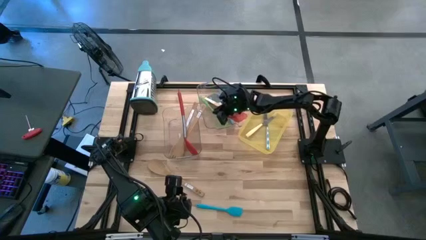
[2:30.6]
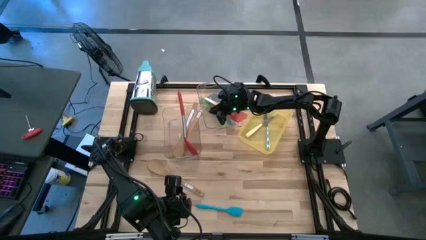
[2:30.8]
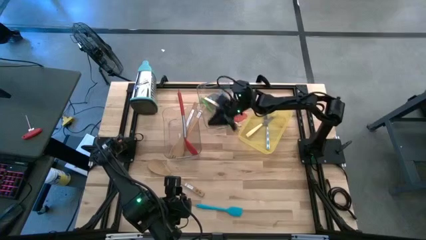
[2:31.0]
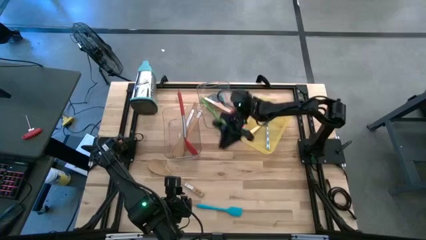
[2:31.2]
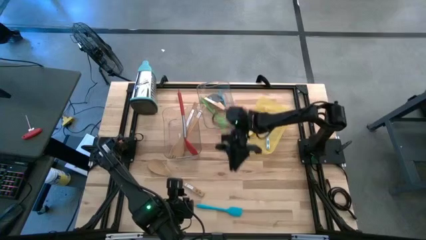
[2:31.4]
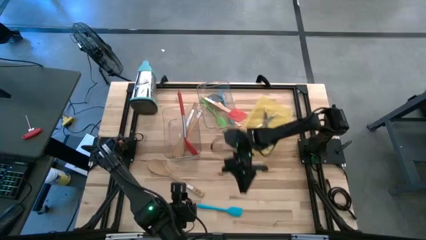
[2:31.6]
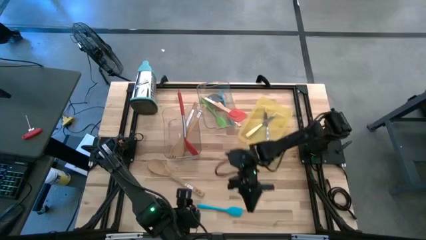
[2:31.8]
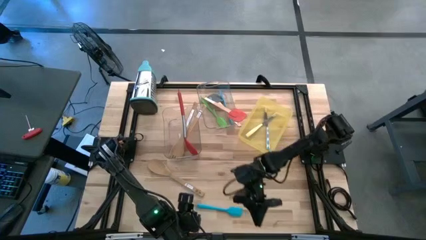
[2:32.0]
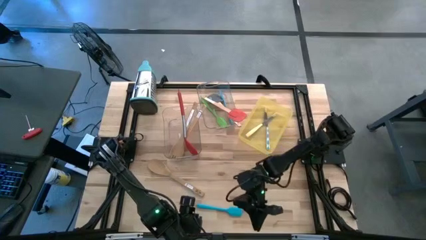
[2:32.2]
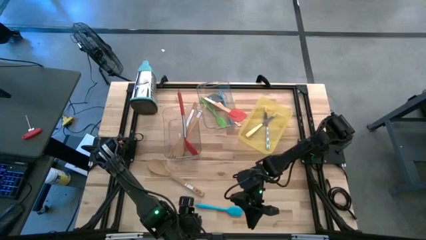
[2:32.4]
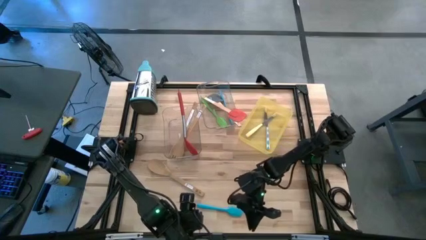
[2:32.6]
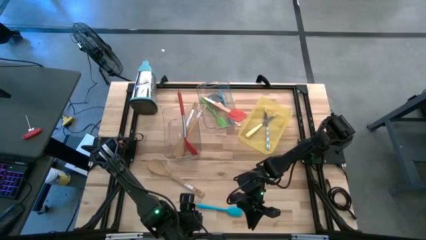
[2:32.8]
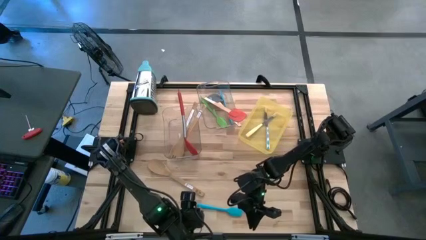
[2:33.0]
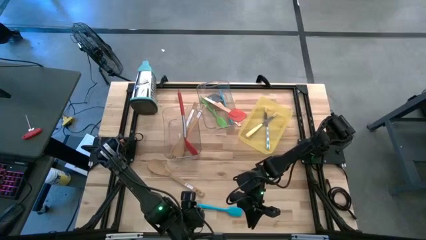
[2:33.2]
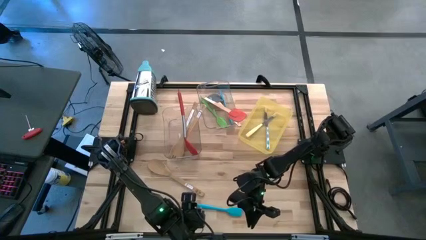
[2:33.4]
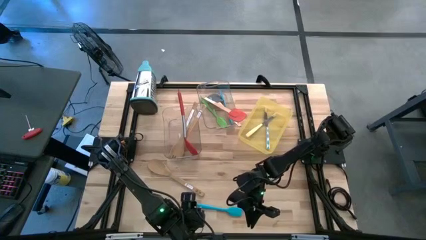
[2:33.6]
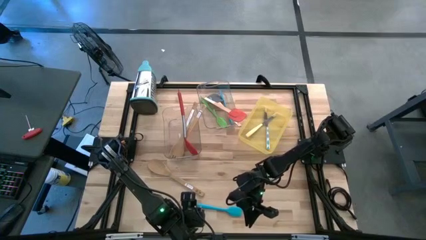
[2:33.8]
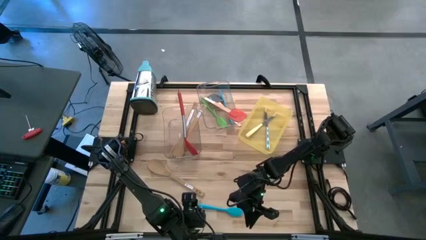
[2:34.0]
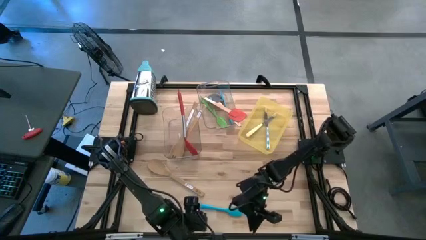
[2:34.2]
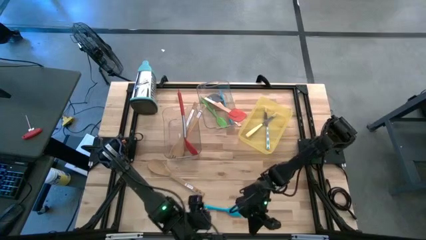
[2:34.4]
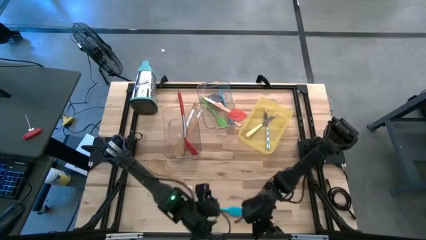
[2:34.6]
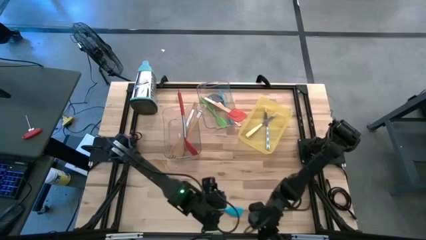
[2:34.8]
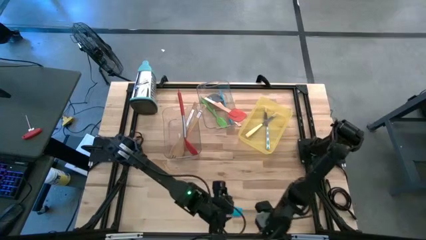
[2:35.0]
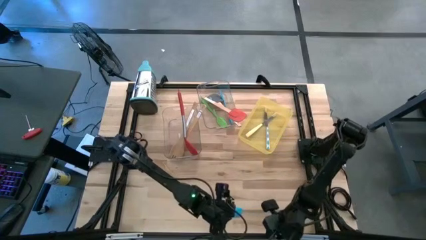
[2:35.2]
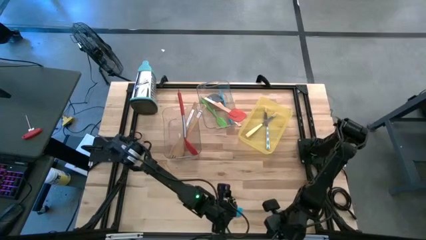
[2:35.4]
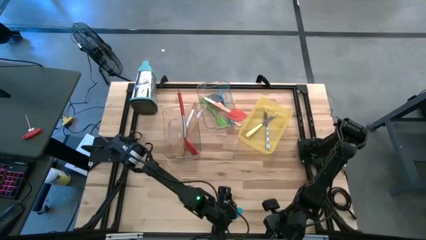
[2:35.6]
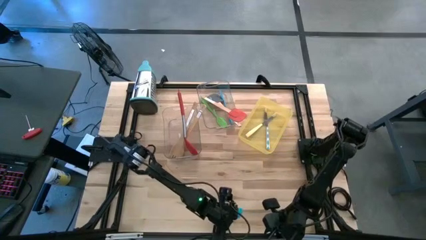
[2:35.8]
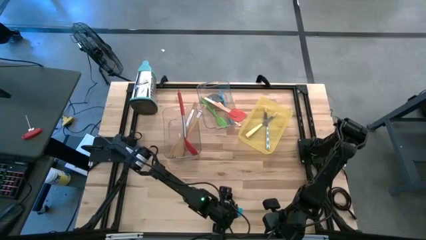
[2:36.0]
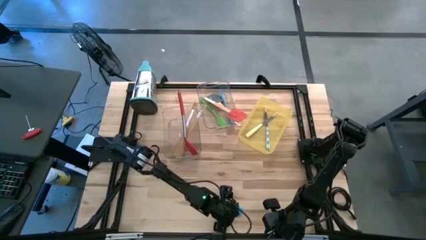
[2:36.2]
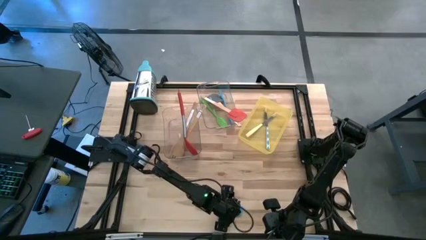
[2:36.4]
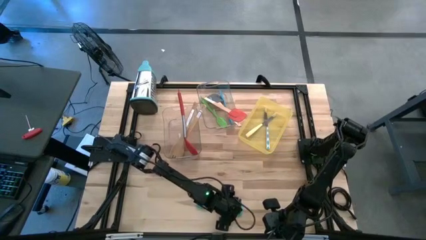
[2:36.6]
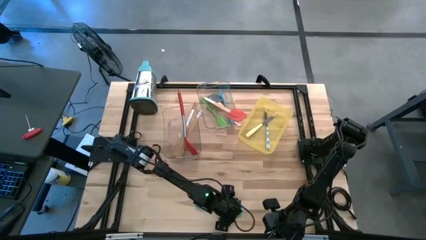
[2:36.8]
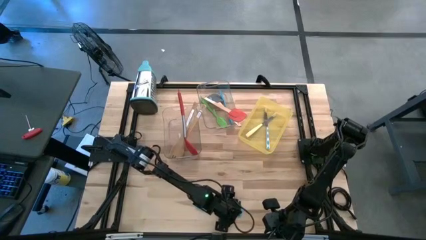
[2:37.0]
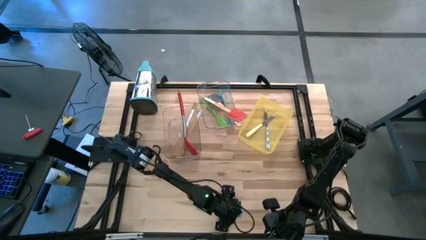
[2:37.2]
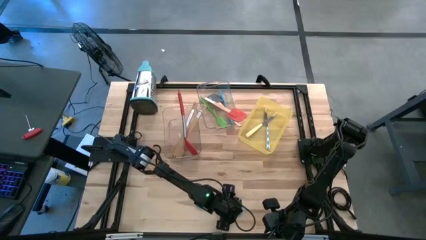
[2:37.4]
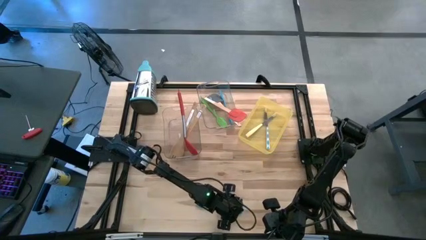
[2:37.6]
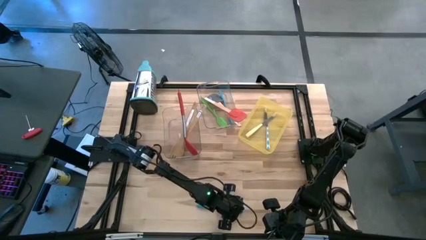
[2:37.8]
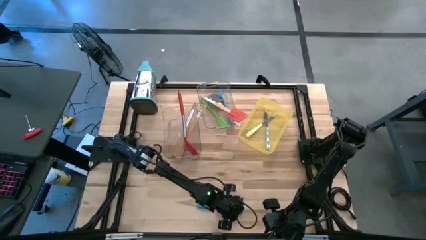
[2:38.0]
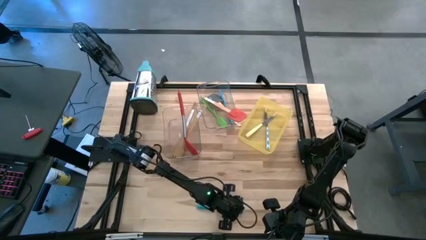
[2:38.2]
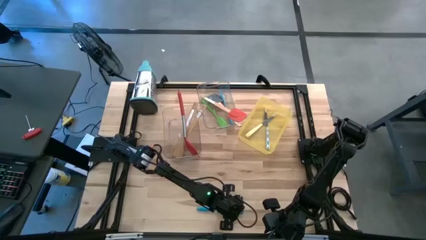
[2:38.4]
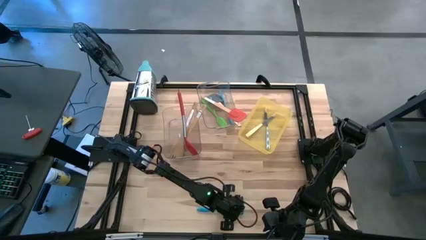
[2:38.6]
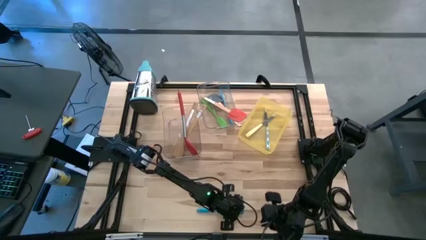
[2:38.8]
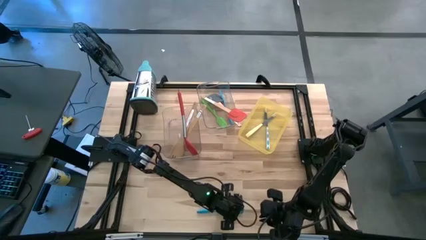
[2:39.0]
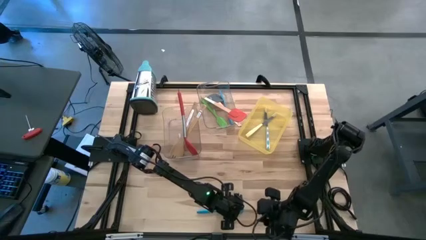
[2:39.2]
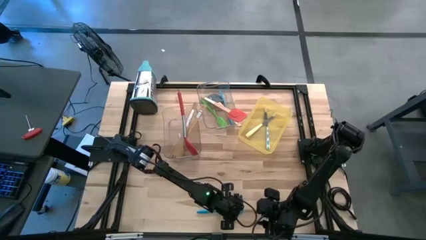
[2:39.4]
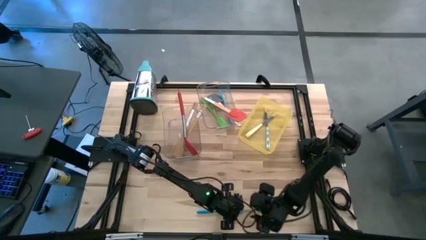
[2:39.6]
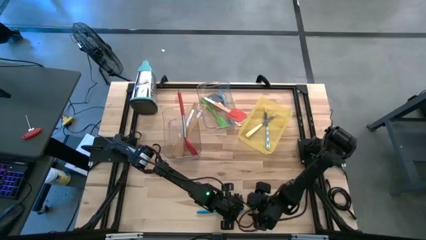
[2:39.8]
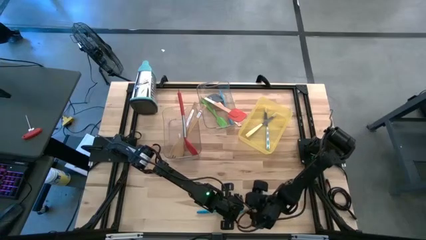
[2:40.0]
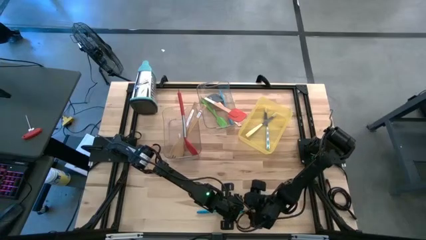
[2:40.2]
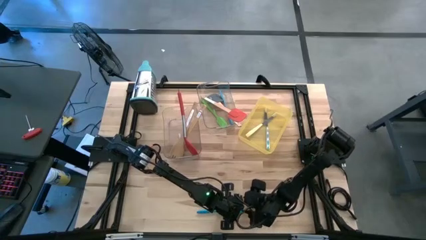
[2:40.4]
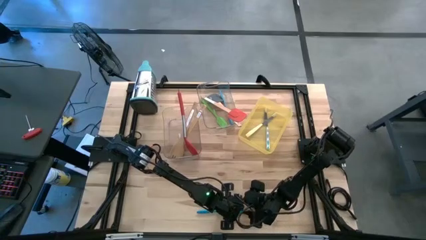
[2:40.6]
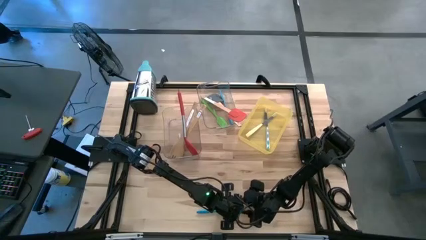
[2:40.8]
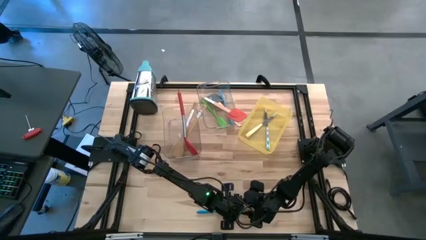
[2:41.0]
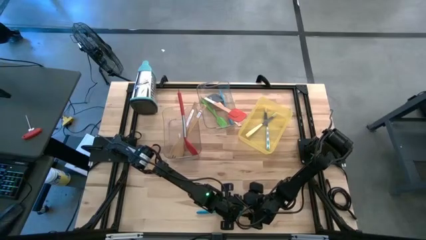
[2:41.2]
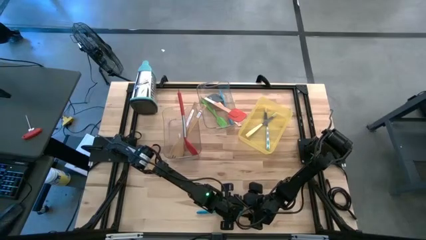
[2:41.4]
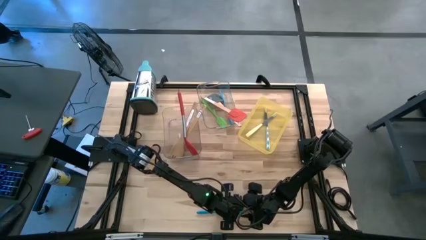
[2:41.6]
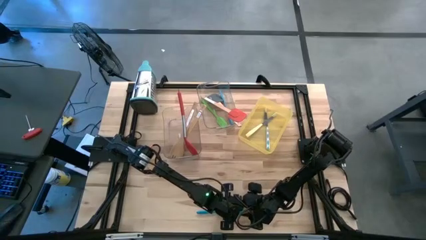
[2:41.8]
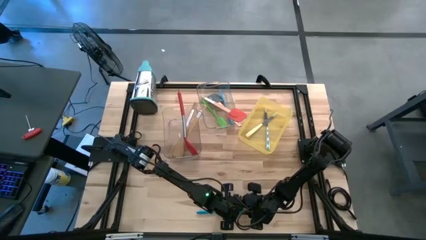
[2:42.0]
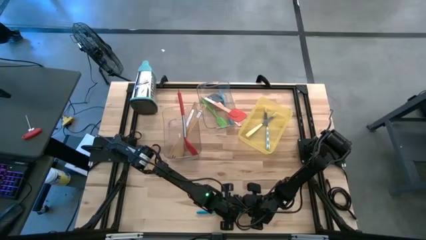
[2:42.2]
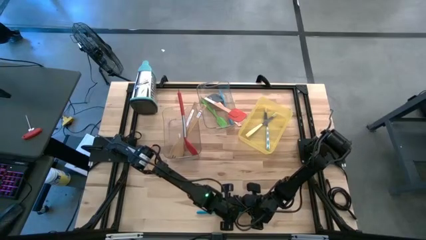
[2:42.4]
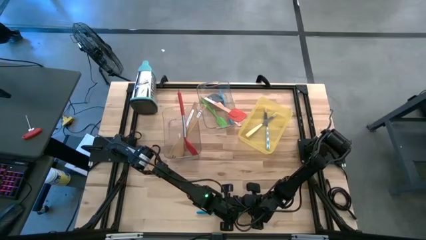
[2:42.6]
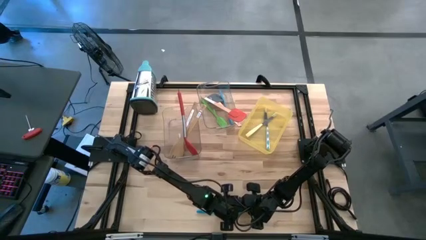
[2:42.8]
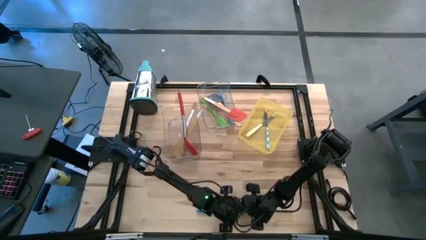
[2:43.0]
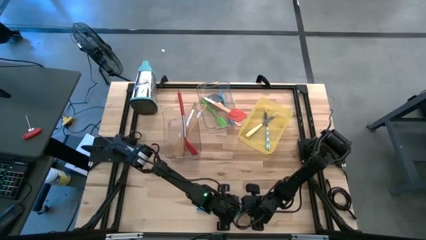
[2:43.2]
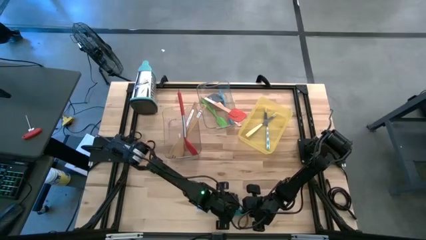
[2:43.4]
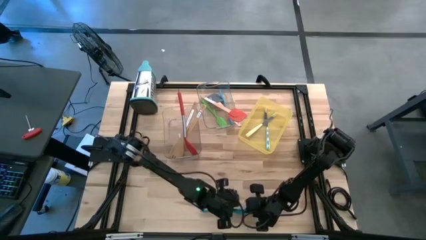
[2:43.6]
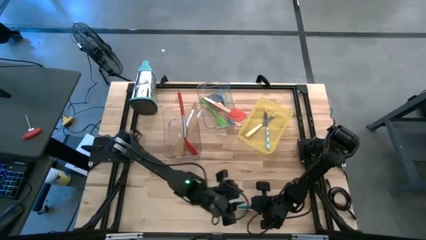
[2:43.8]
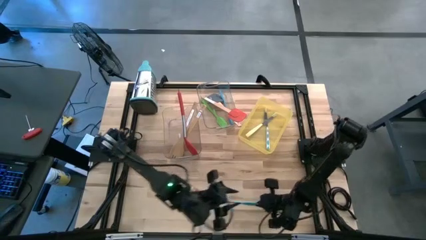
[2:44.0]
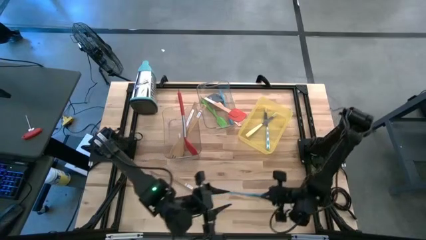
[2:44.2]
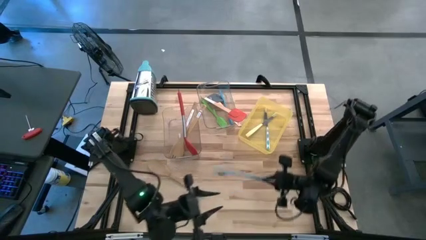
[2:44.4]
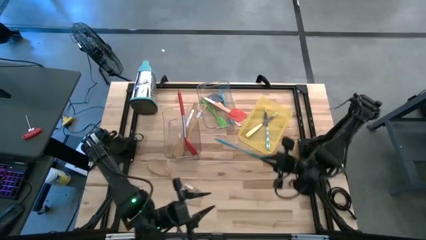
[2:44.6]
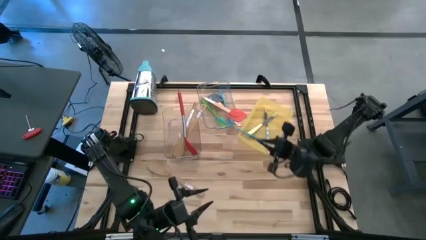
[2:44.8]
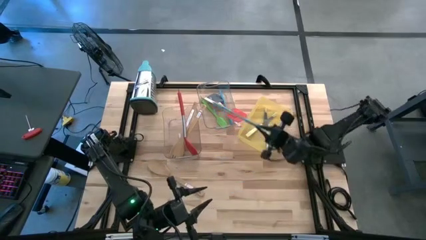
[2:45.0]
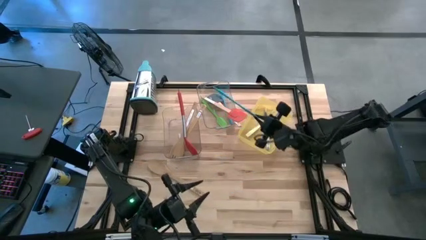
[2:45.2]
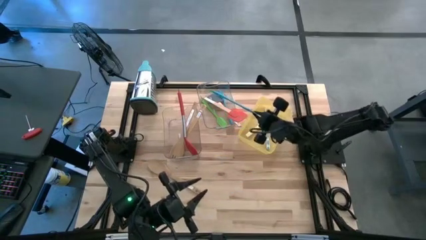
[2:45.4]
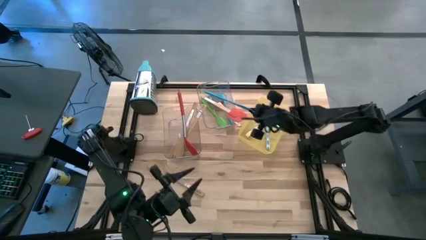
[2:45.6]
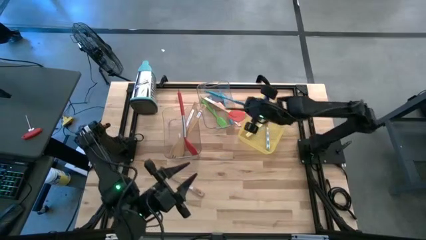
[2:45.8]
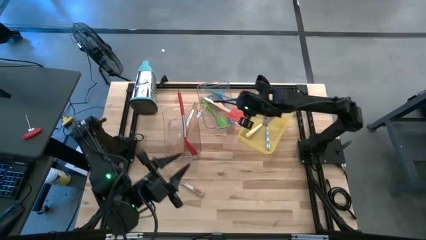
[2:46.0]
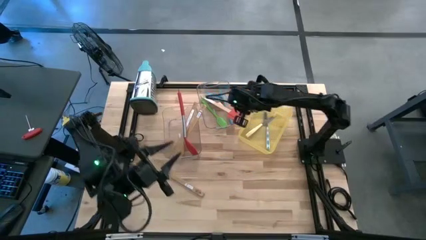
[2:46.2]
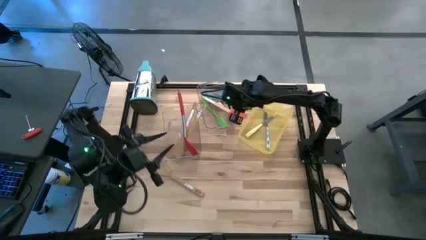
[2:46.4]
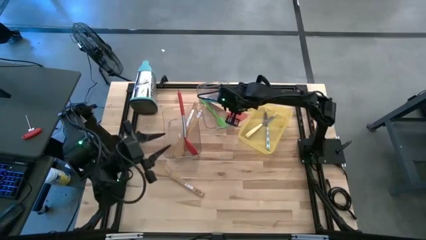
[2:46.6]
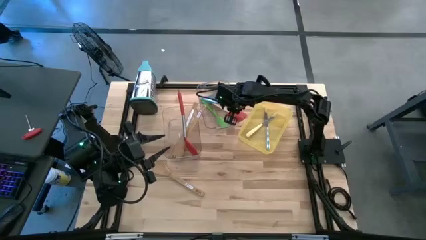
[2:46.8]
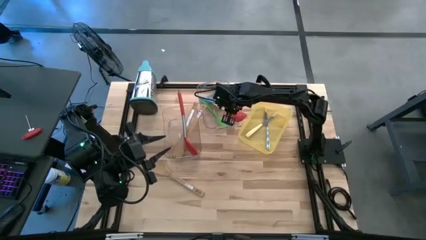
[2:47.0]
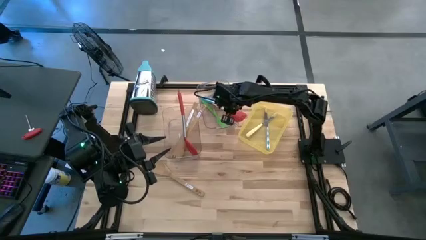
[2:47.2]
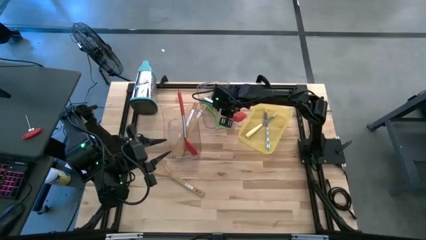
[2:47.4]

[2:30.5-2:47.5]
Task: Pick & Place Kitchen Items
Put the blue spatula into the top right transparent bin
